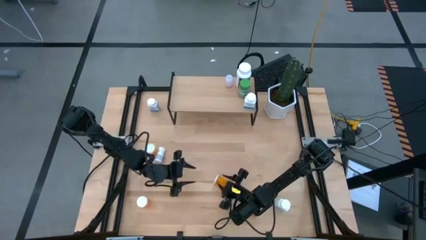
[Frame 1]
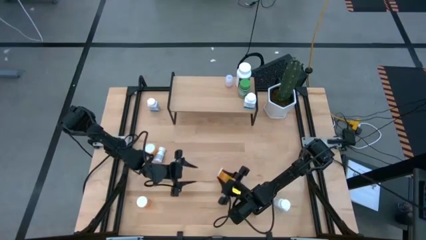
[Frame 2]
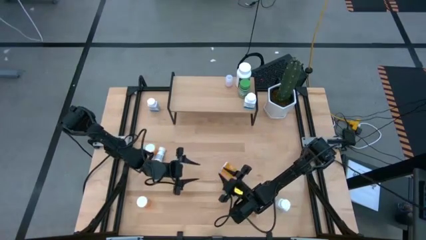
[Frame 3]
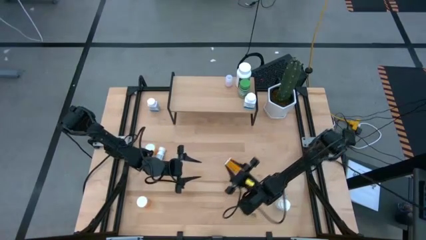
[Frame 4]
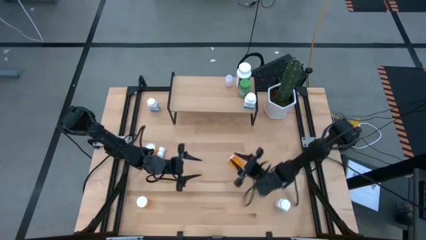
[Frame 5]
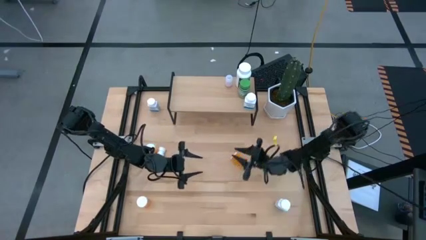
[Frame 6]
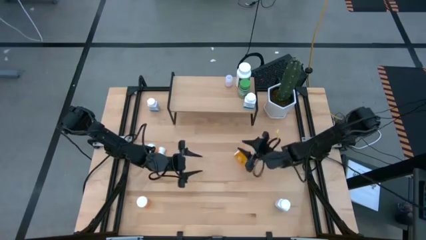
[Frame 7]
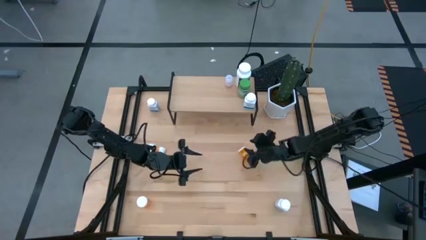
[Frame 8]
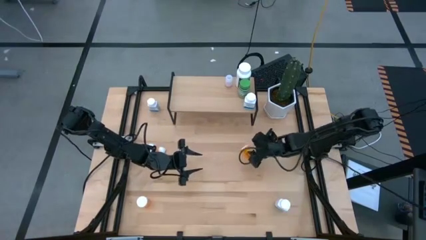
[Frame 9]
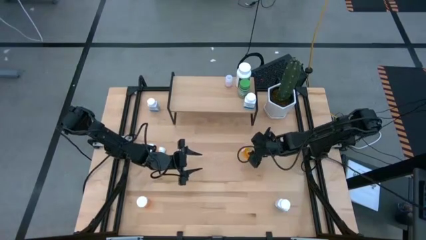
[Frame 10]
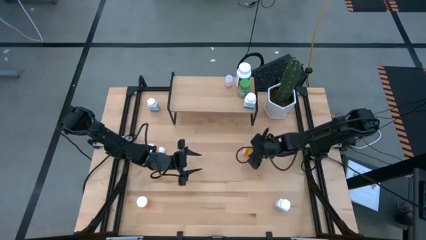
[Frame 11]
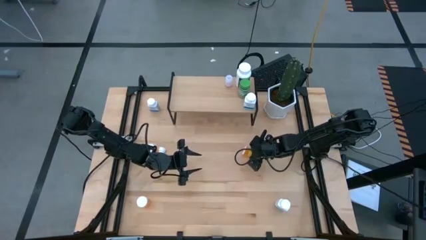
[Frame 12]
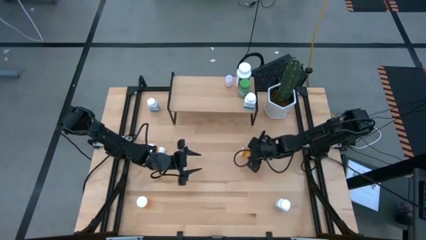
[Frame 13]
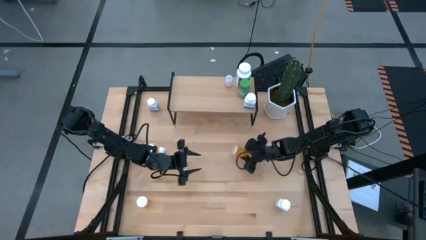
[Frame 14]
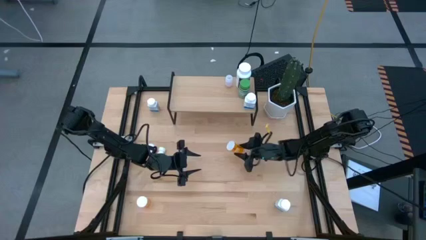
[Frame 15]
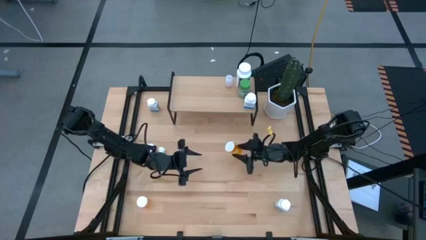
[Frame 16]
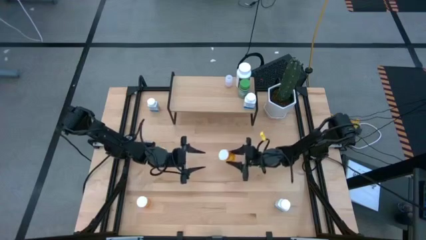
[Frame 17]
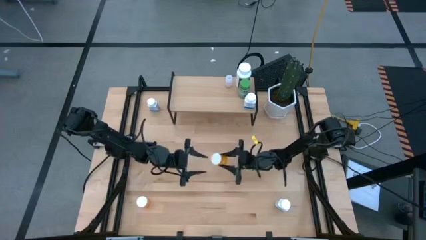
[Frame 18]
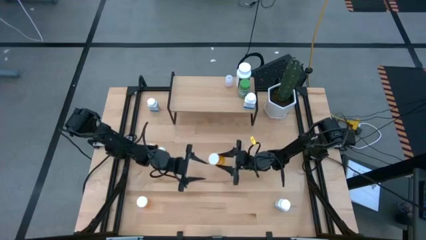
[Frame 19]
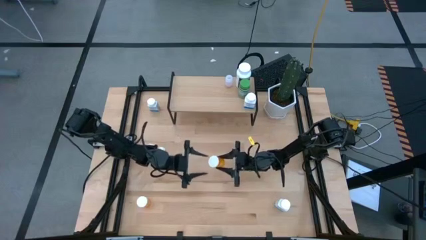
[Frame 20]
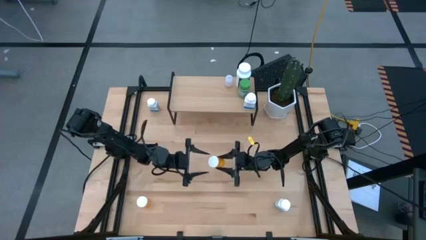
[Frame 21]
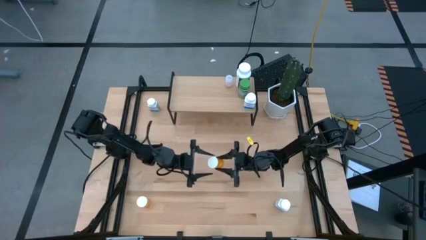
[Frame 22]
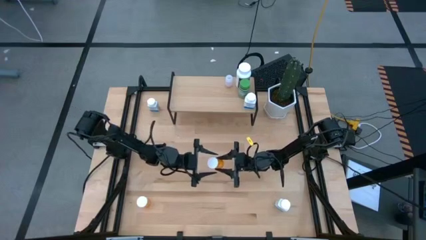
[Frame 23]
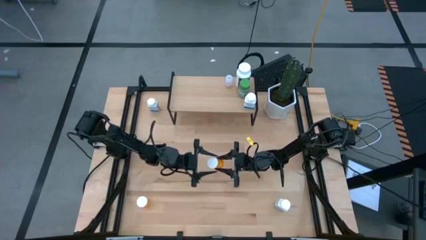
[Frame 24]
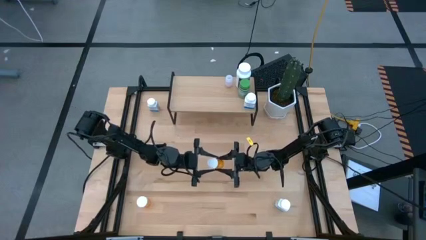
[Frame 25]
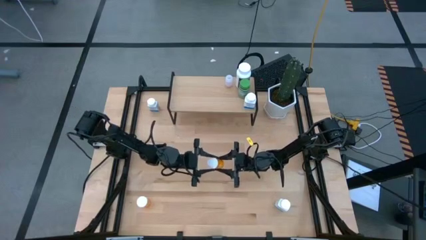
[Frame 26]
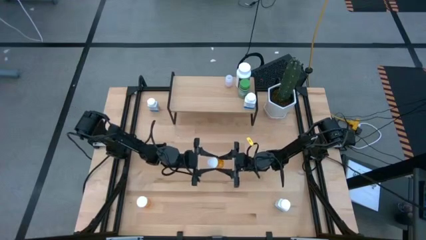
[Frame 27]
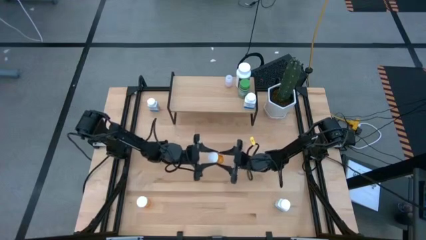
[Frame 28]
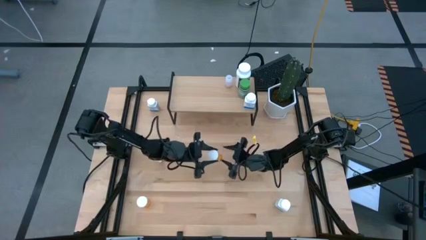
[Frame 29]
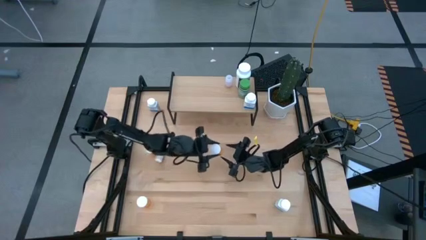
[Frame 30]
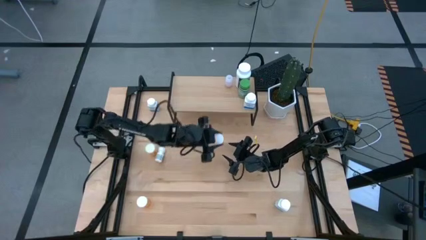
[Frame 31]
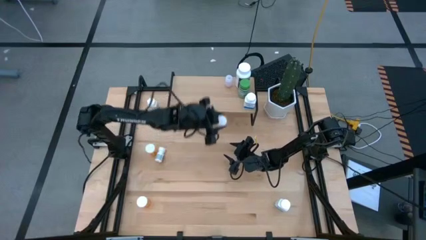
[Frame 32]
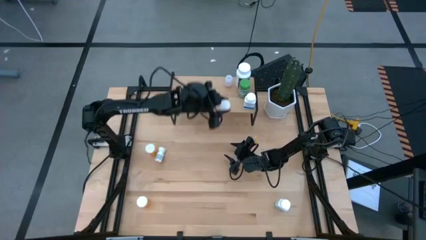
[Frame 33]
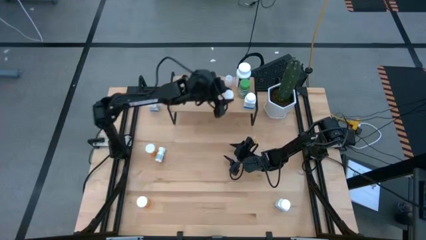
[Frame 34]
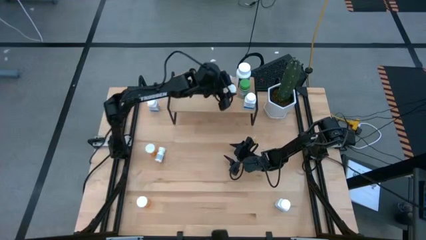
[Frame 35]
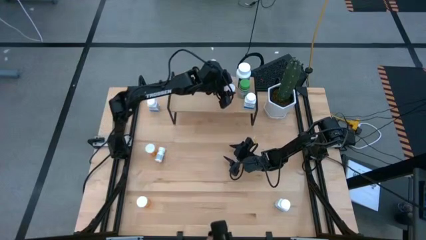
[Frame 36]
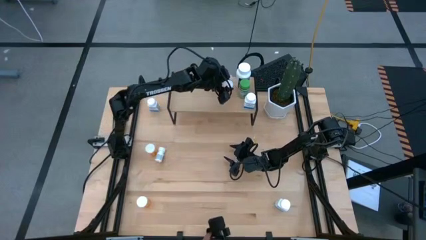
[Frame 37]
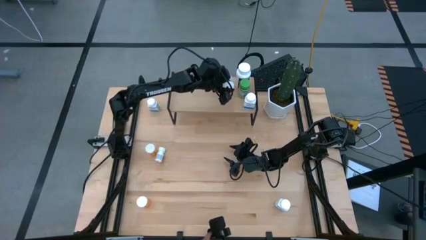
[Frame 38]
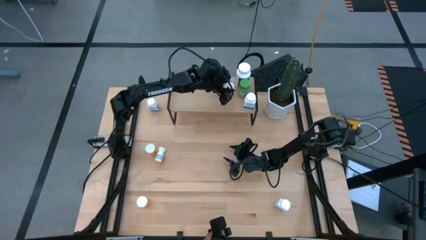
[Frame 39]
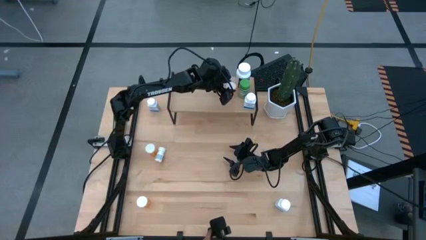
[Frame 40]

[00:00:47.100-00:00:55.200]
Task: Pick and place medicine bottles onto shelf by color
Put the top right orange pill bottle on the shelf

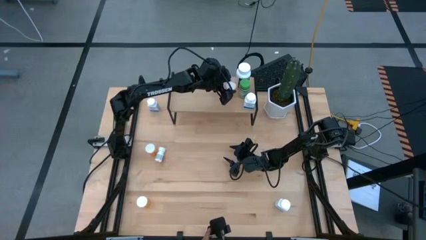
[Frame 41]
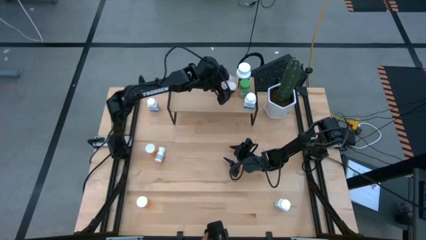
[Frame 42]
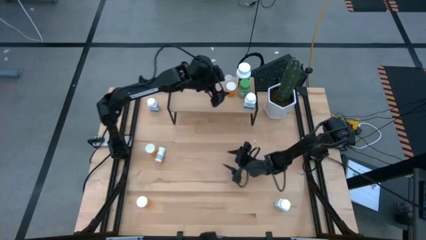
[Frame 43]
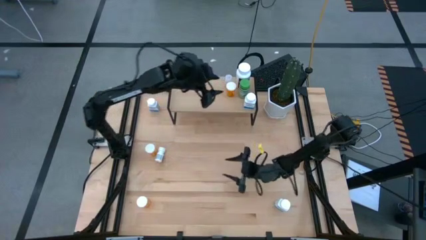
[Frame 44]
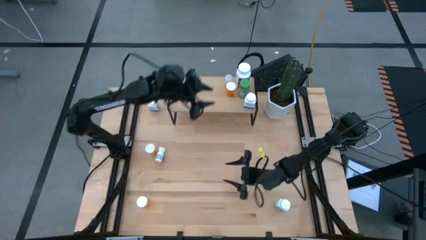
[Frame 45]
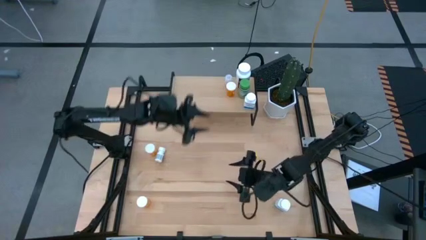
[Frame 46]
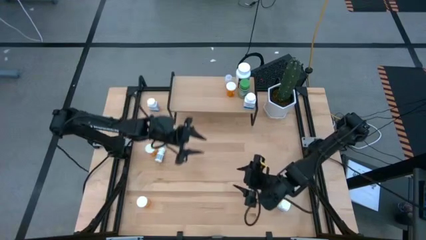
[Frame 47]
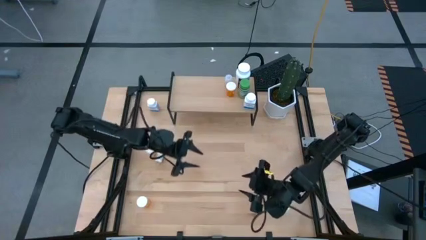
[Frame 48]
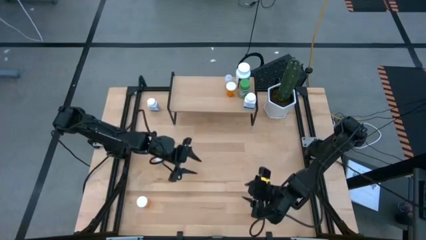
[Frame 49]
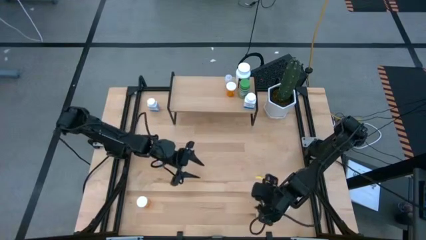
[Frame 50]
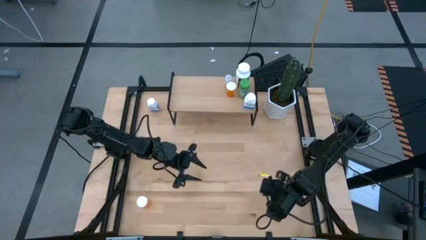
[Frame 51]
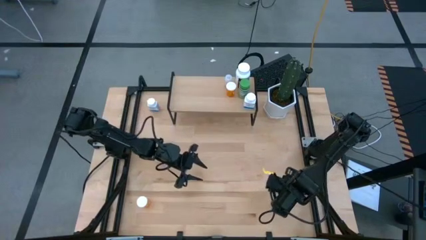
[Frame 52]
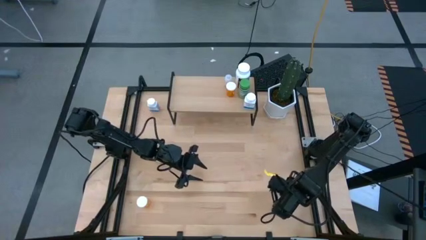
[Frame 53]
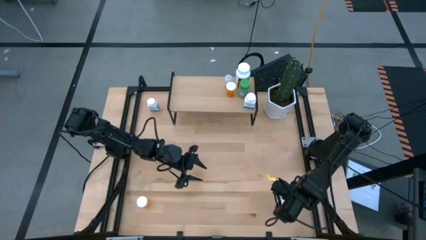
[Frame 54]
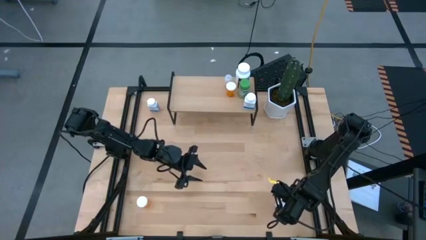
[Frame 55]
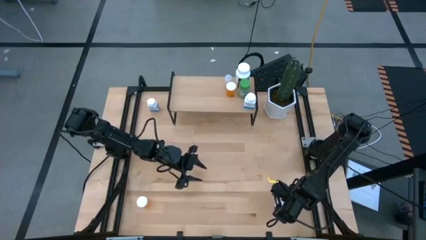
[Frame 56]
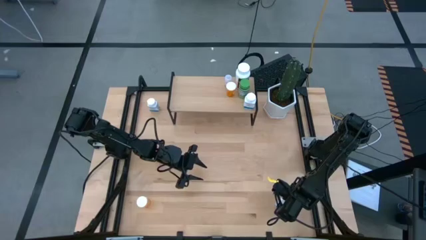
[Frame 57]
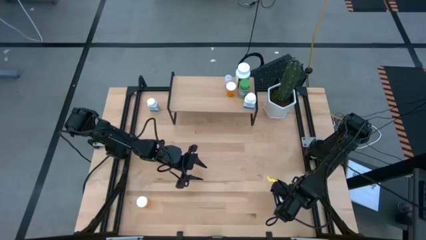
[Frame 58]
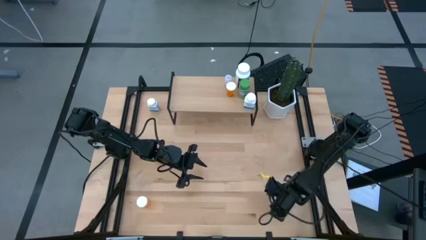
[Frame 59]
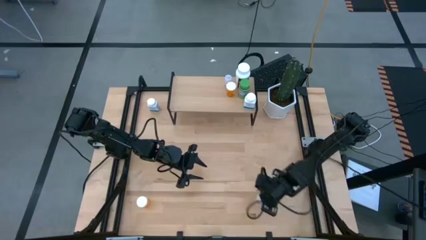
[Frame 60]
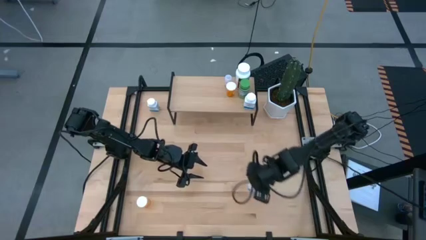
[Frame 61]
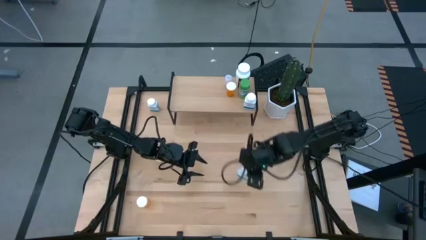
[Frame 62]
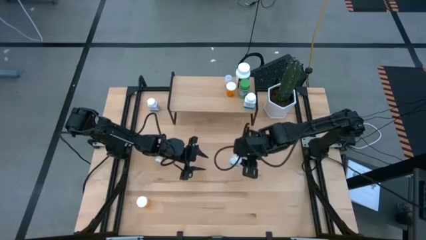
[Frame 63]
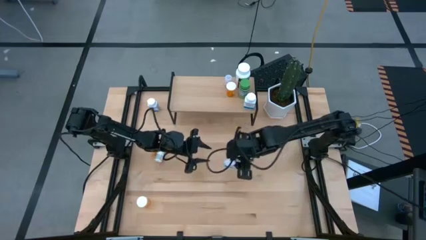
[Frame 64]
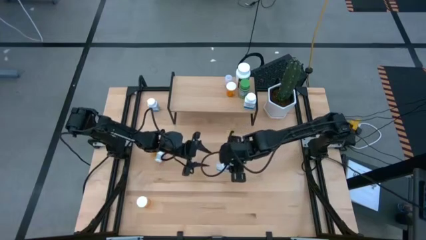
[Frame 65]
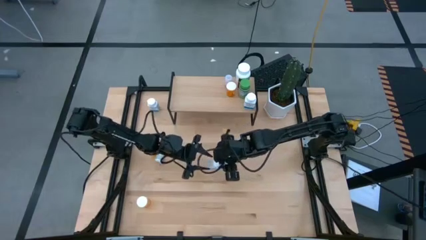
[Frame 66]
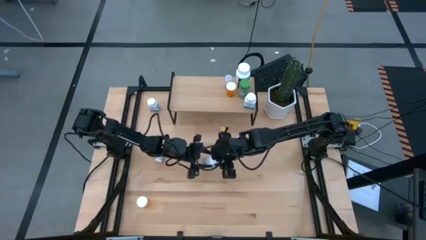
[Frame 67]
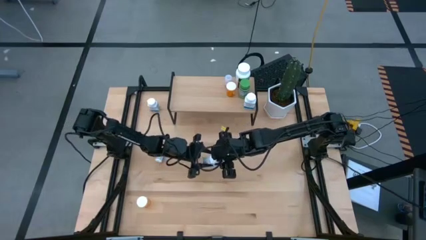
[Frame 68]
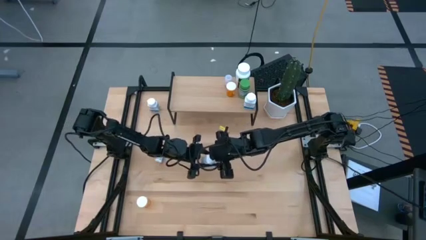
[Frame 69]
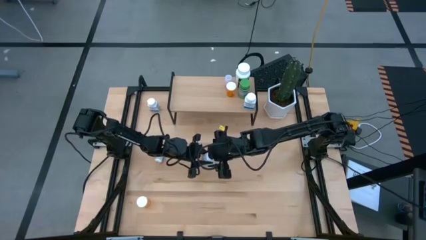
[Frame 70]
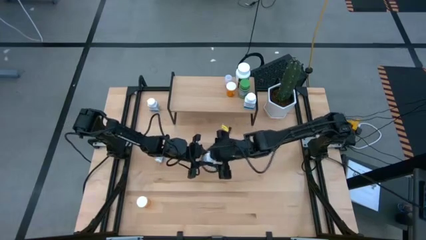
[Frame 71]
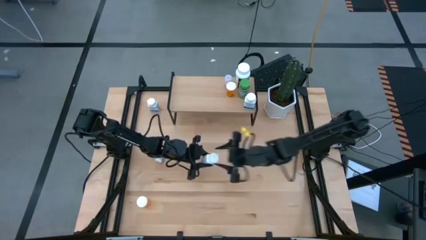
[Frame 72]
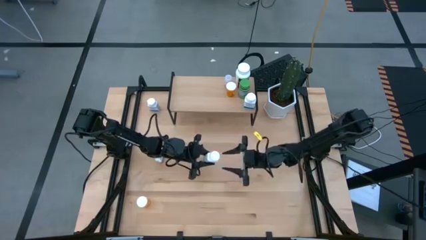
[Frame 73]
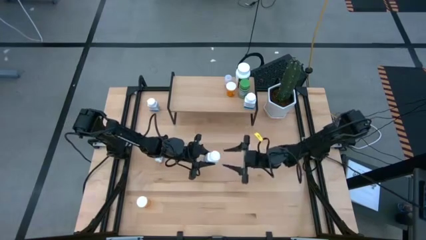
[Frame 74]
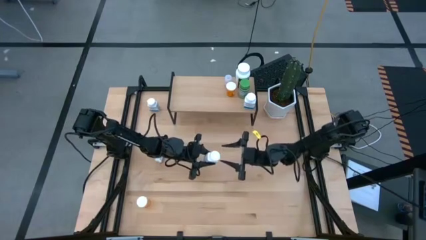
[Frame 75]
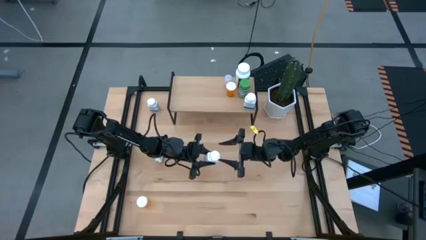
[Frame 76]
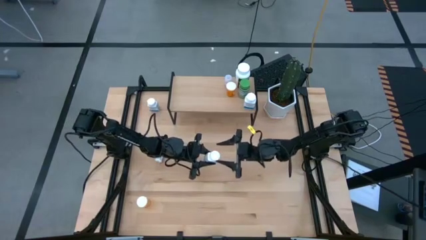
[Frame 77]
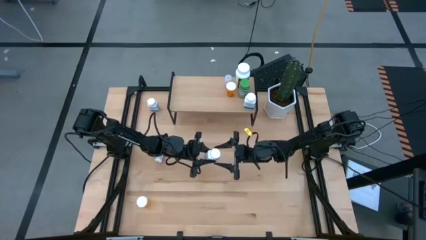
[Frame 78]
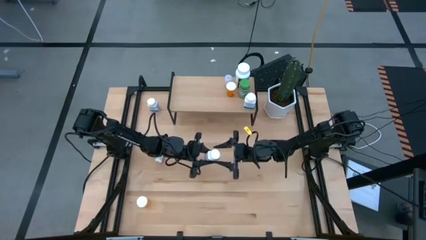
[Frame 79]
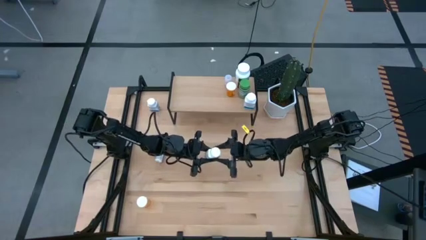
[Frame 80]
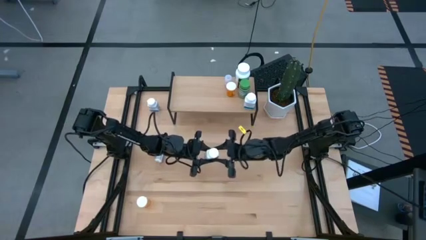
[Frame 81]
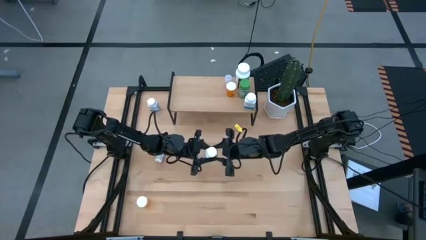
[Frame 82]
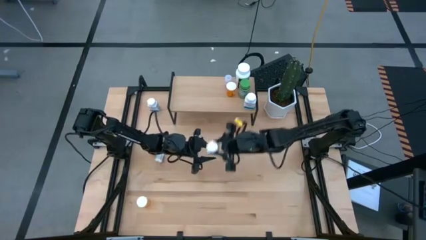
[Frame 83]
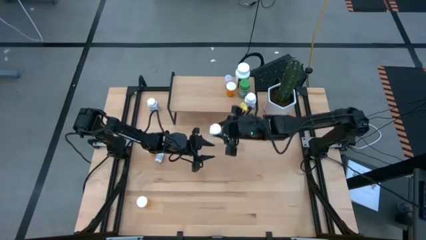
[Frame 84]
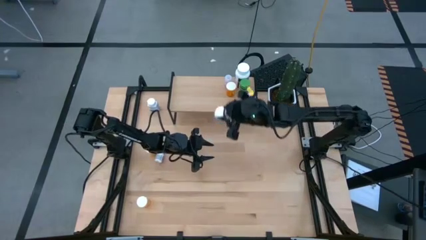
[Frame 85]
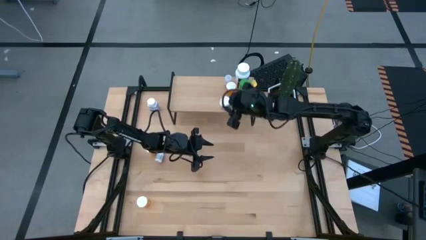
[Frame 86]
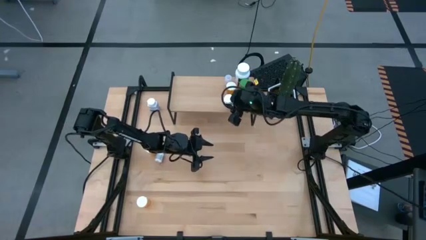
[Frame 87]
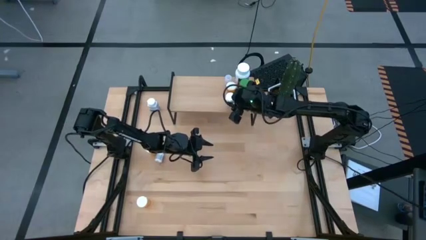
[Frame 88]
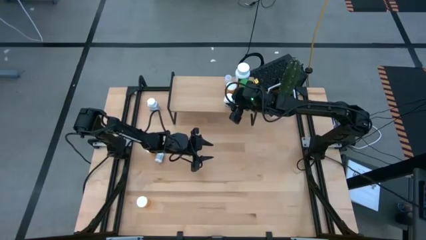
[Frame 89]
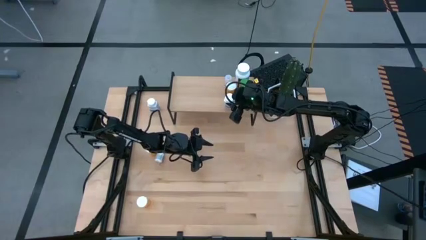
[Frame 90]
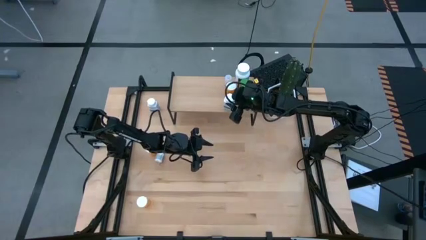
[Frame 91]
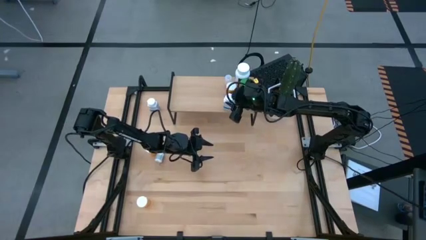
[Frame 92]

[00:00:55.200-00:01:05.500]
Put the bottom white blue pill bottle on the shelf
